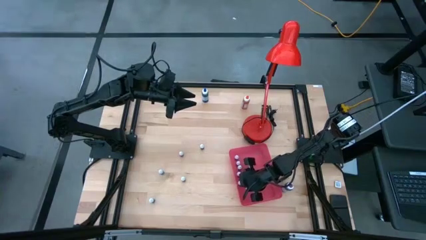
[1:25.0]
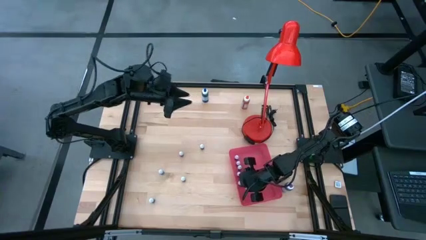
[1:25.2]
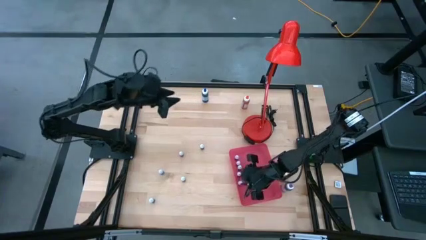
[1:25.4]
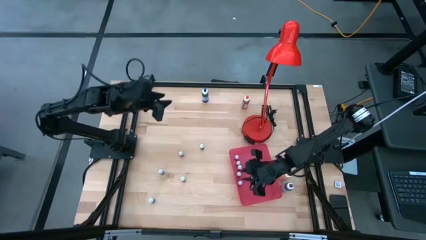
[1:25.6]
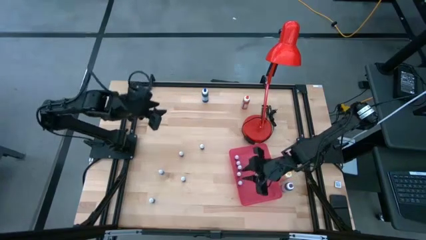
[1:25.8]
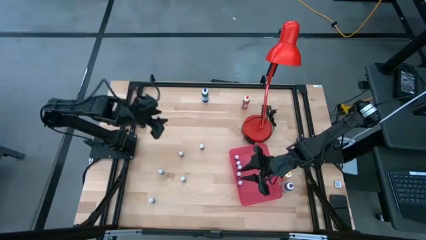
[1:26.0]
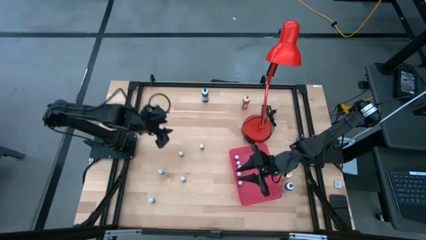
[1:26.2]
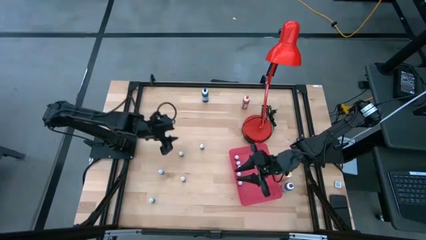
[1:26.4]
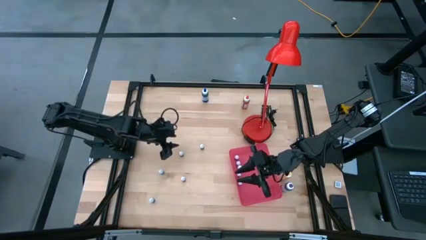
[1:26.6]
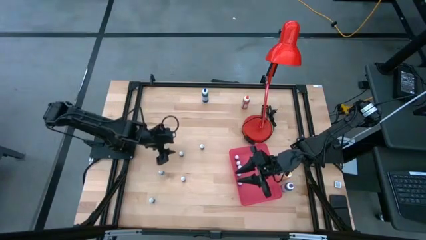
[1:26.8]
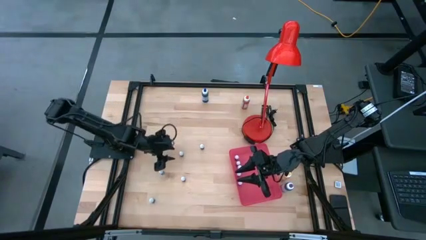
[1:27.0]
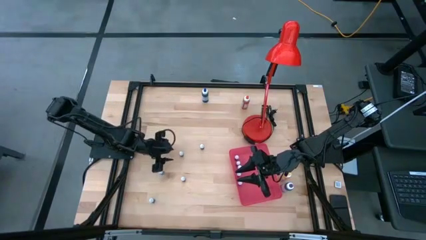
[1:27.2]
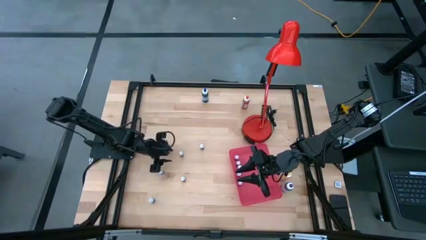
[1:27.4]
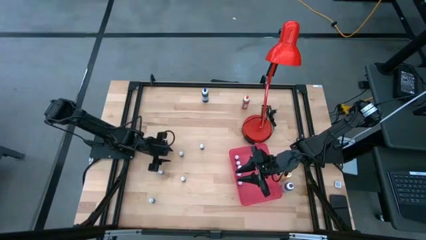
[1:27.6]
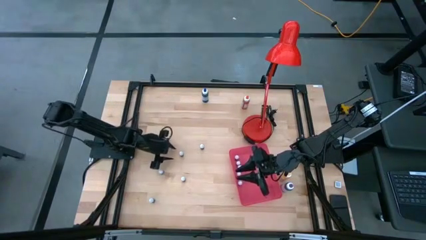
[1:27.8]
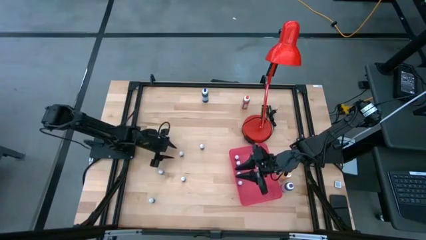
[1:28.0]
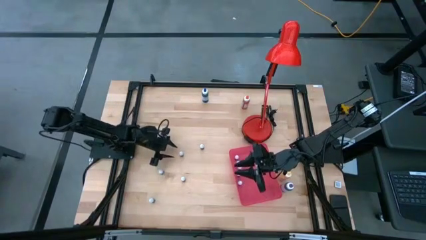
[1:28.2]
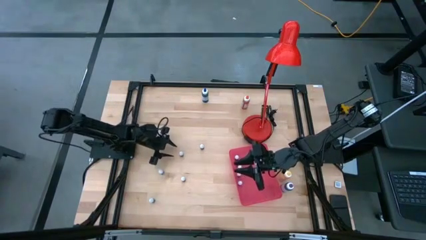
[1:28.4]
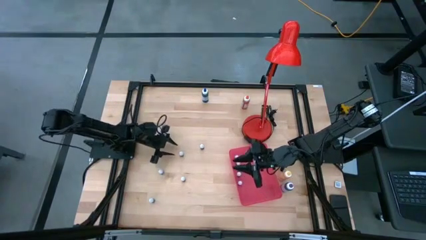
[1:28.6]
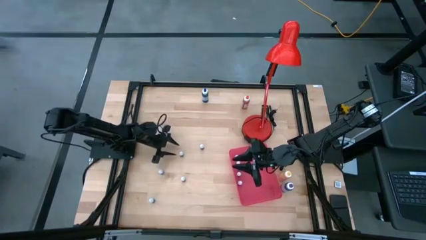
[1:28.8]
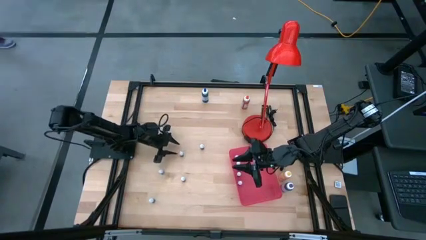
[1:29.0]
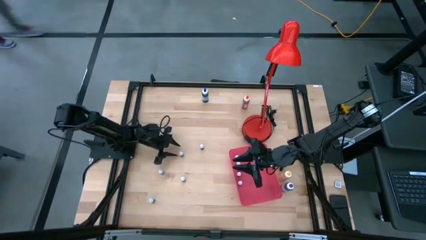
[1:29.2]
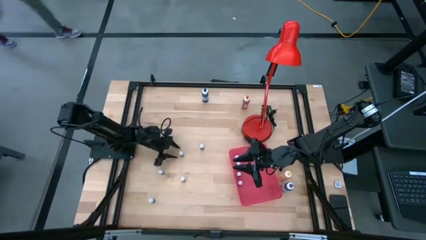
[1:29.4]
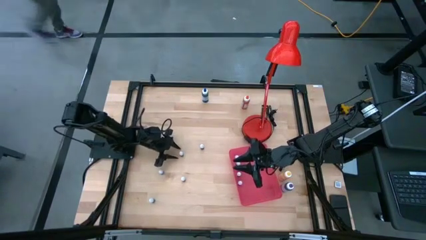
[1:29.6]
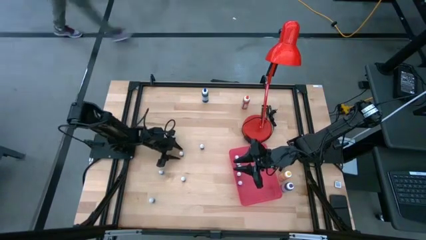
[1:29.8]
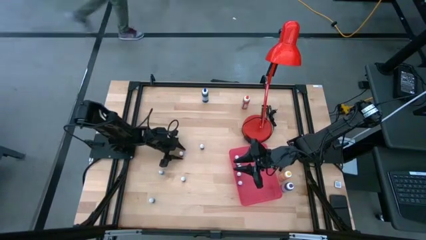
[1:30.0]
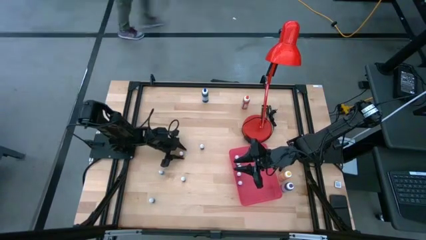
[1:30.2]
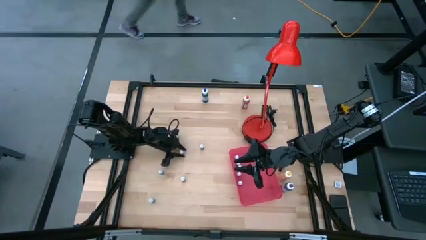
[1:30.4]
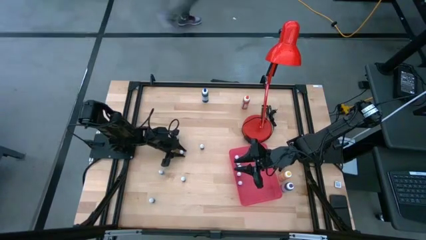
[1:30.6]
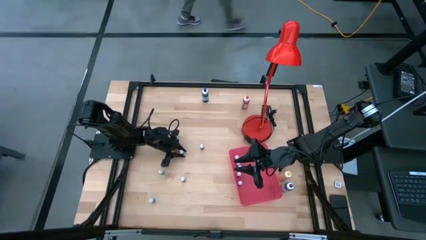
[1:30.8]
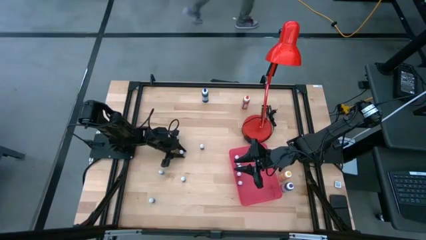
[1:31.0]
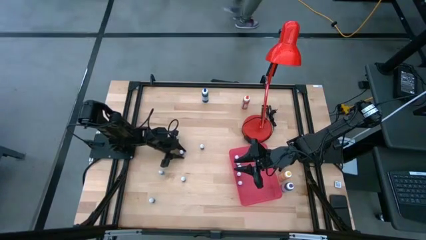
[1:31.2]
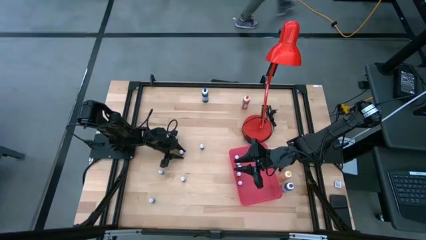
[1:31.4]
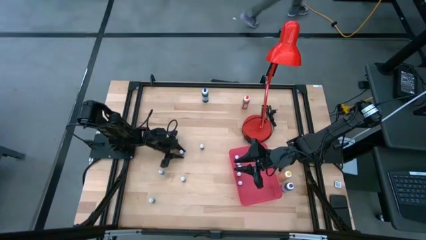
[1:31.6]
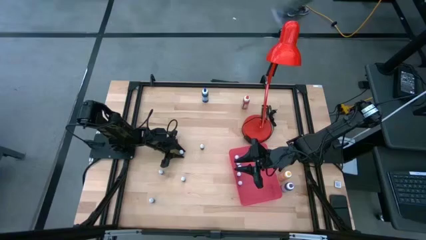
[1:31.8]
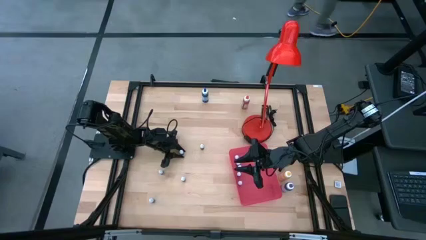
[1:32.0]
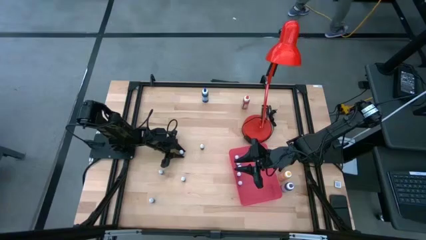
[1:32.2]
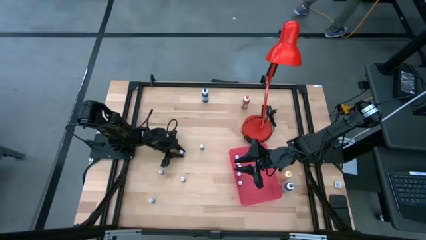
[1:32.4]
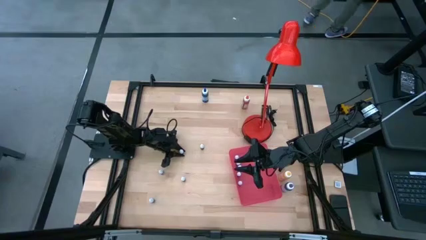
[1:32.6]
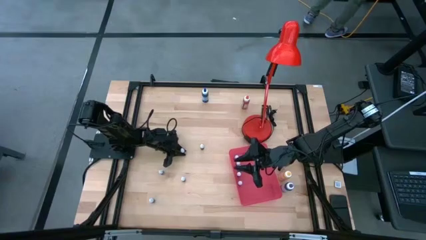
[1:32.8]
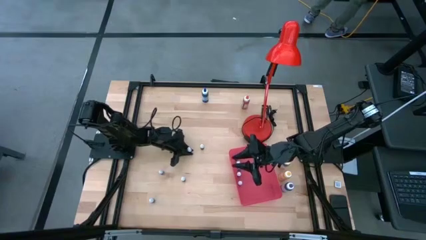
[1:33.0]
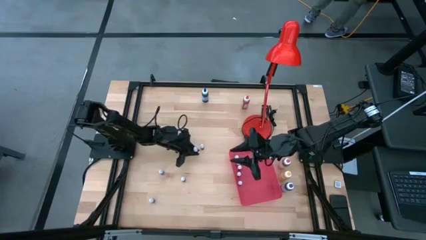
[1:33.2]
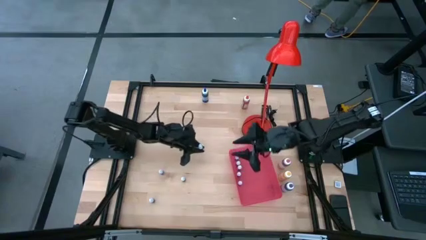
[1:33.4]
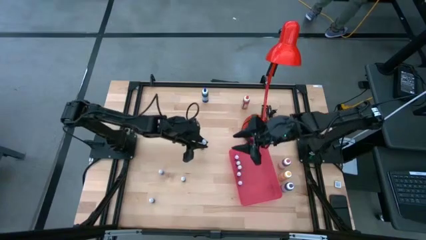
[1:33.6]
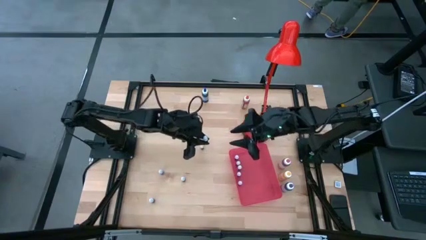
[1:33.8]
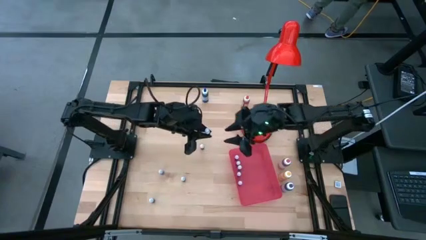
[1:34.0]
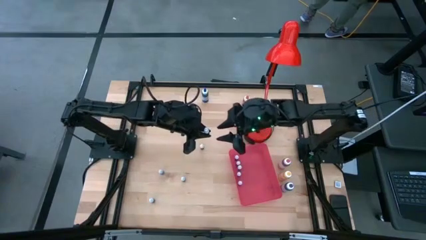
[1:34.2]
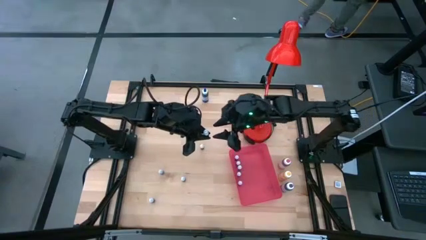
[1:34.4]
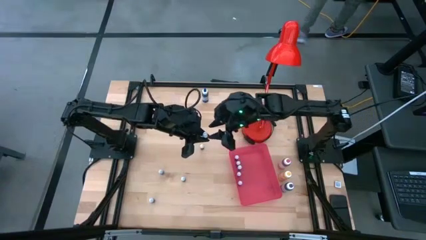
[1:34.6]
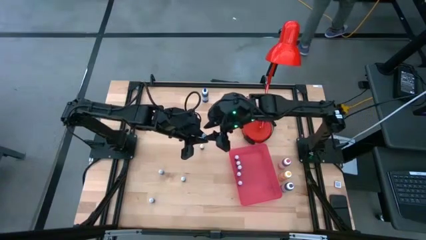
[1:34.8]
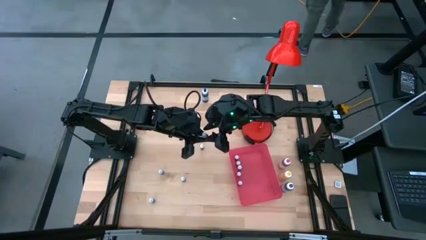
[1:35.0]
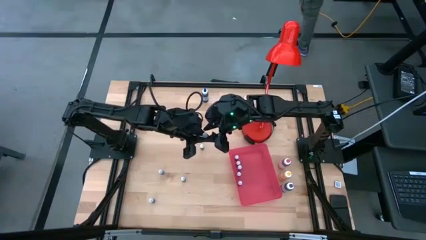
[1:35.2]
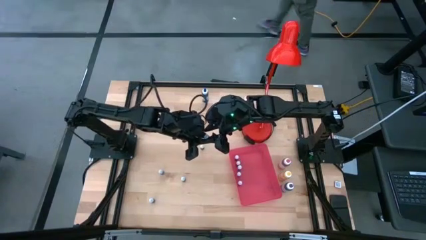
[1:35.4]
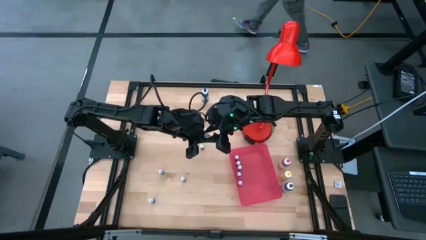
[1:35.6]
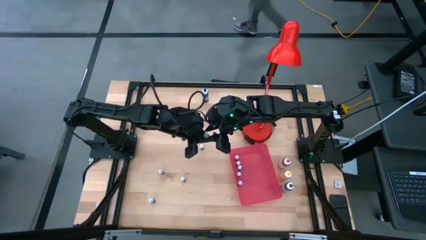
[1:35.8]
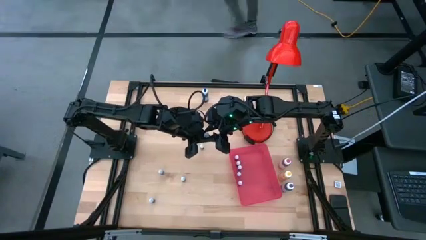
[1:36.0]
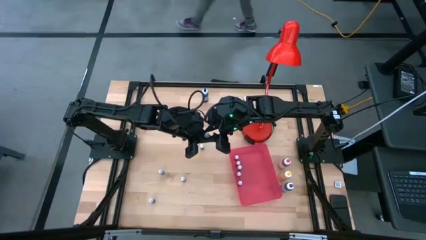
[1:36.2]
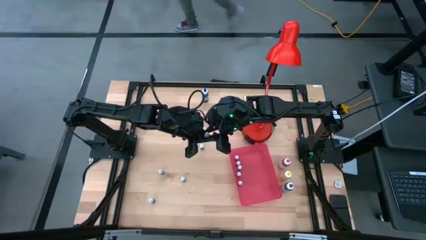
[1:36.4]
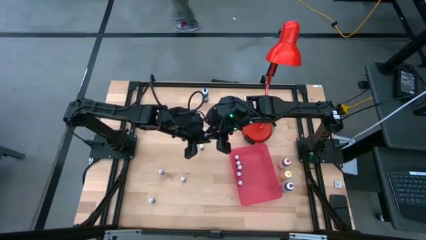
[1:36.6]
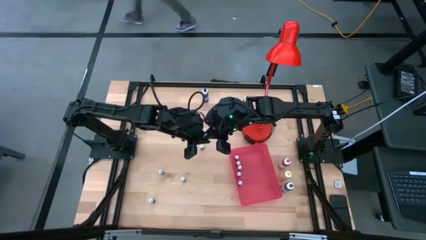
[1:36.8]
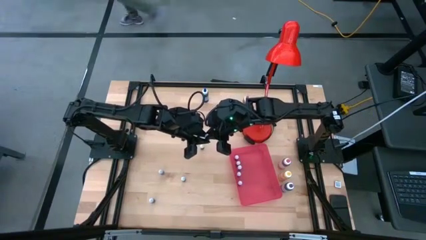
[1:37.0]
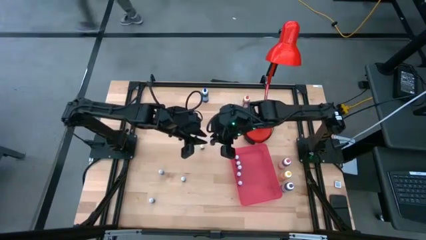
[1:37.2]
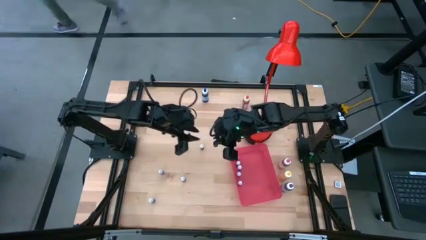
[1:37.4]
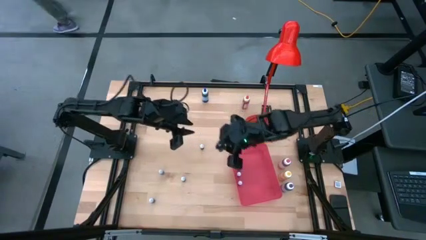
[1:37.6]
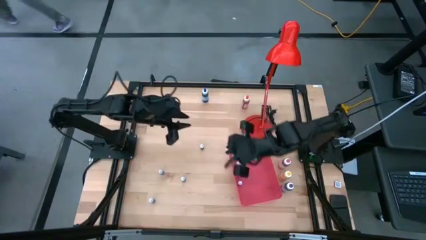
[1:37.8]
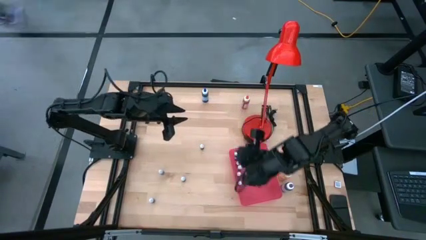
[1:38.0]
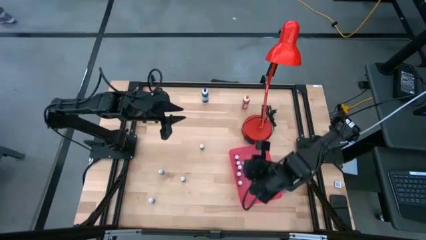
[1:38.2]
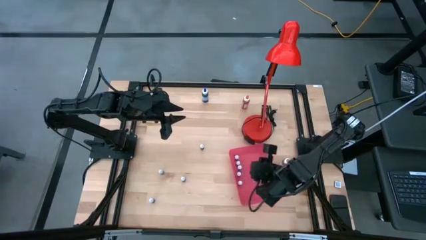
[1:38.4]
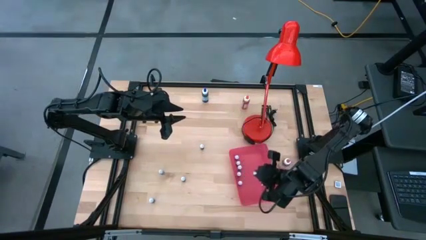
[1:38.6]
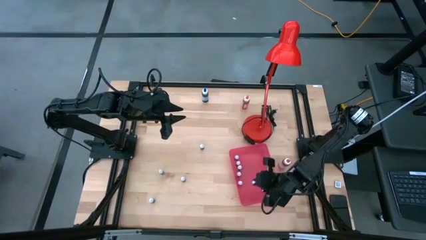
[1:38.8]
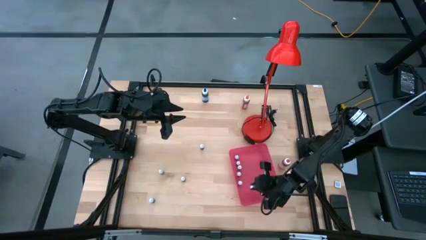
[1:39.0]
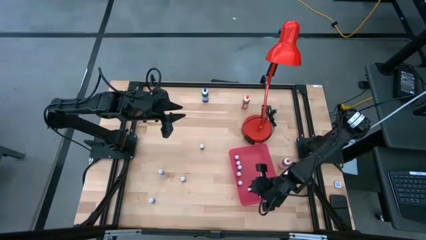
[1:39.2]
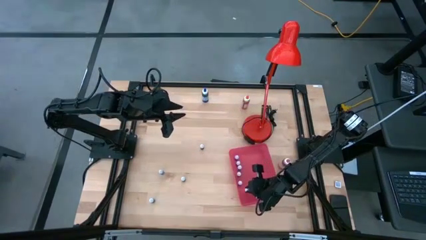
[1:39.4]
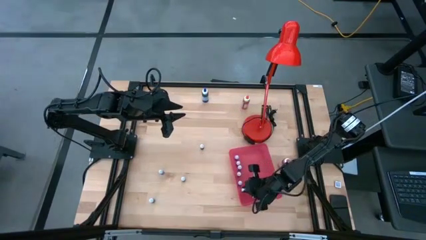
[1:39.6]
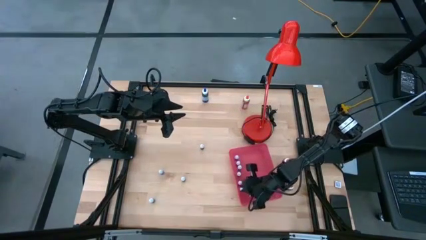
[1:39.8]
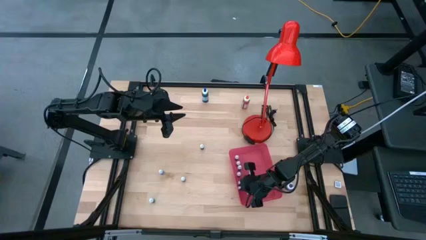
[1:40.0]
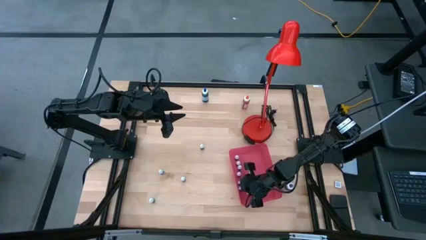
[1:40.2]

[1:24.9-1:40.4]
Task: Pick & Place food coloring
Put the small blue food coloring bottle into the red bin
